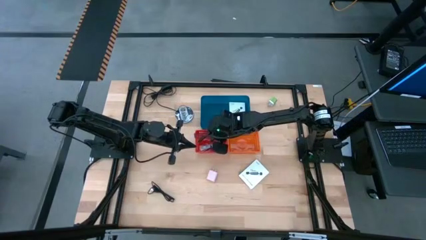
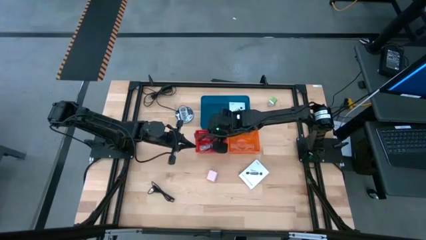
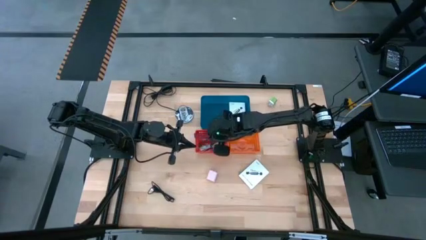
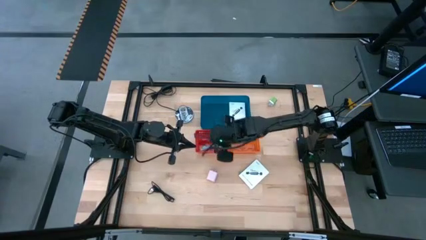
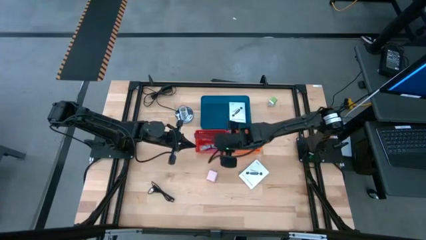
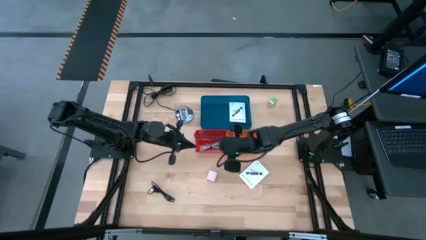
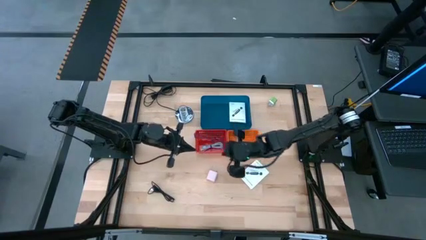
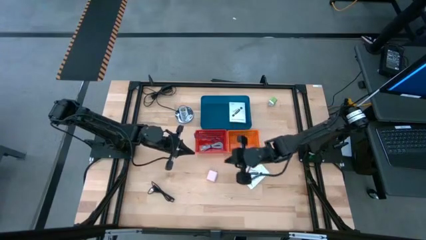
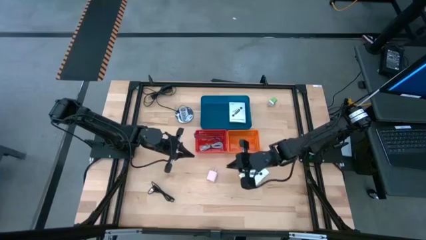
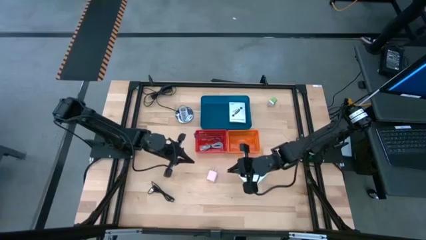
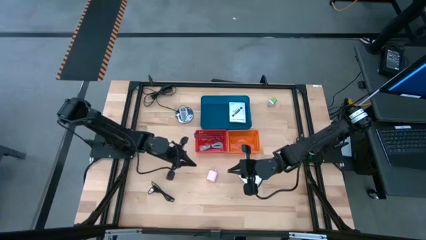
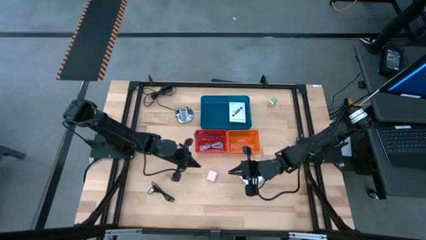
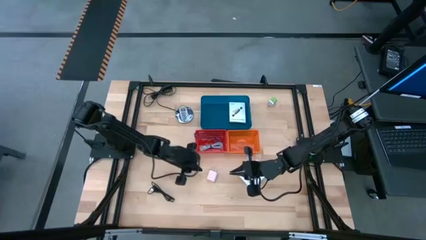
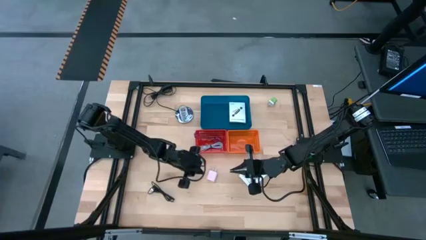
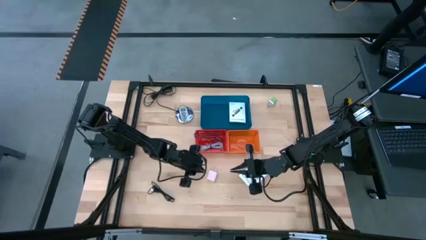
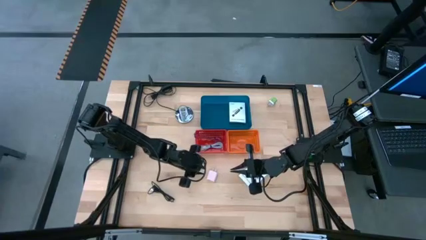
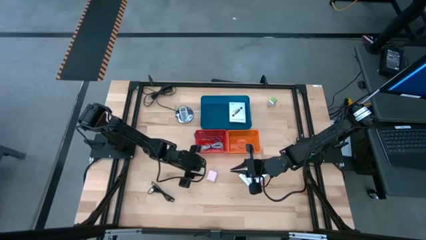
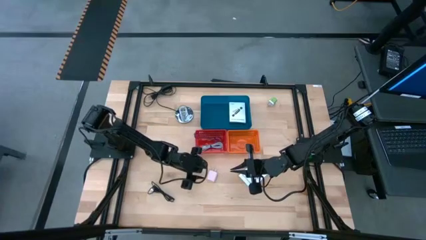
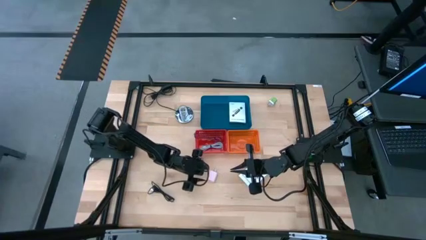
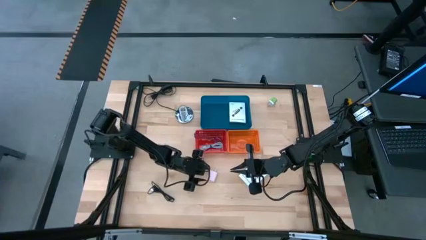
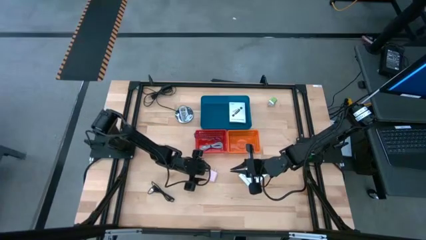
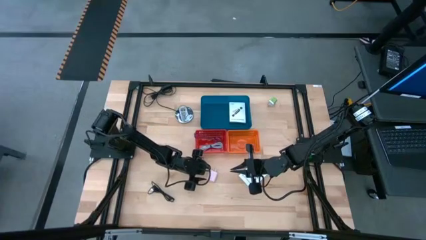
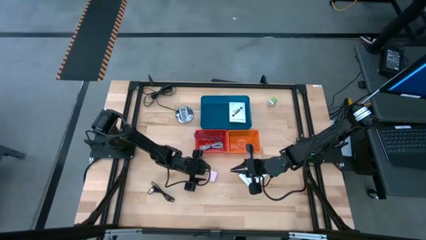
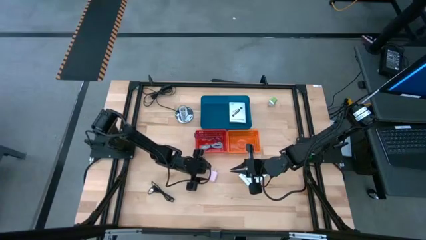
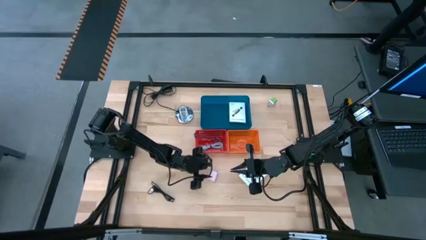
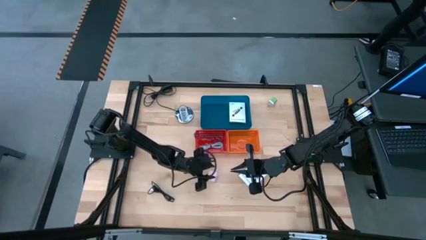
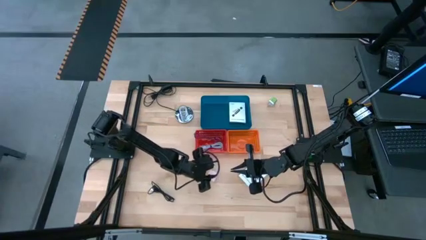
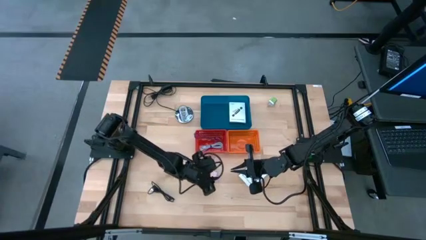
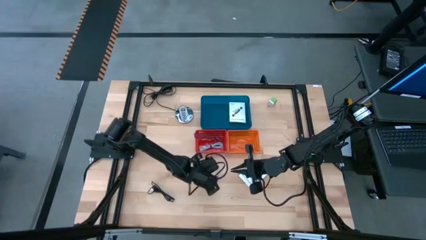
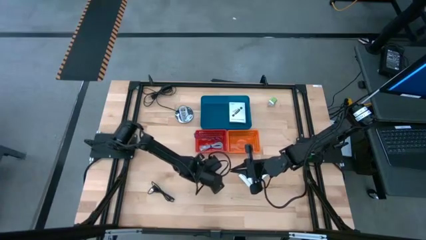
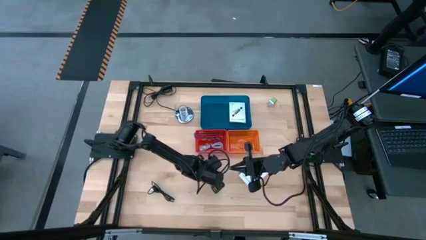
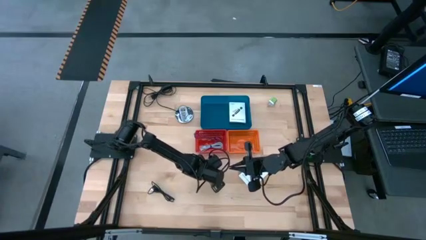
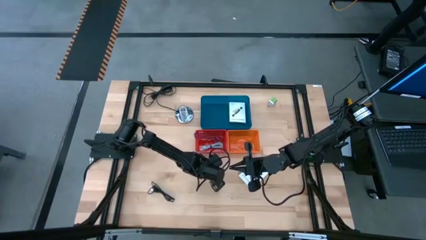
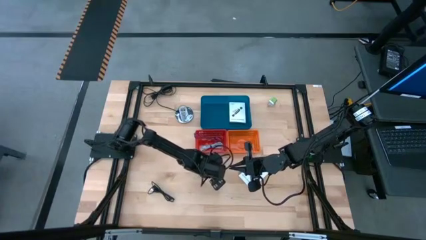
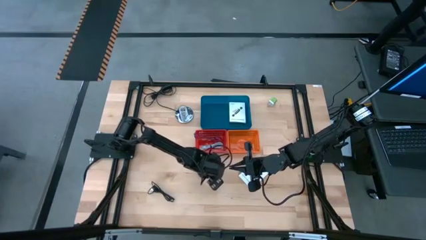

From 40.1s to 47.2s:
Task: Pick and place items into bin
Put the white charger adapter into the orange bin

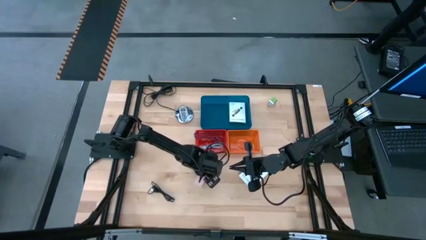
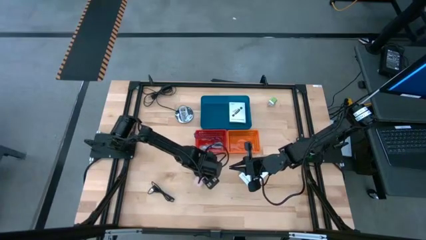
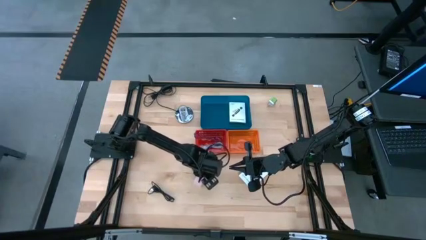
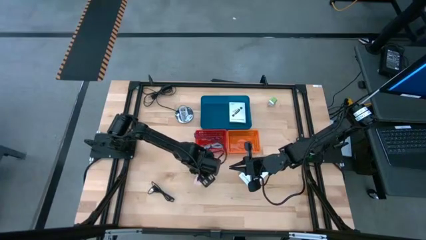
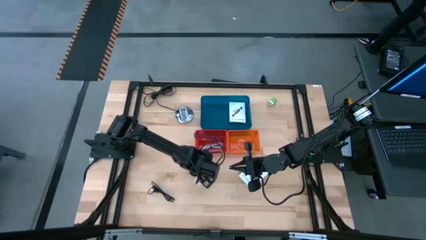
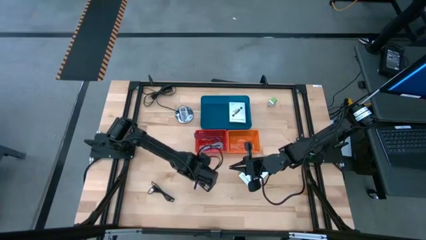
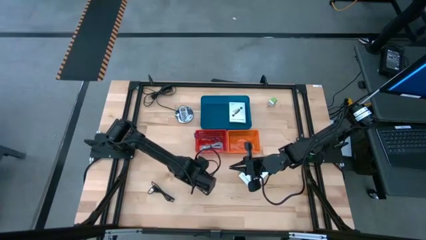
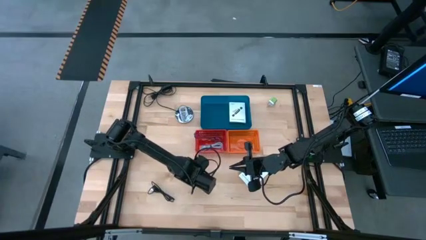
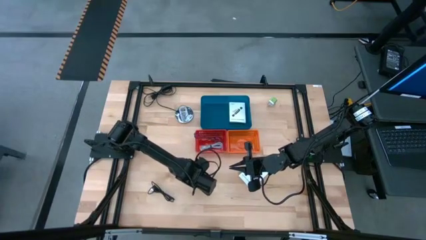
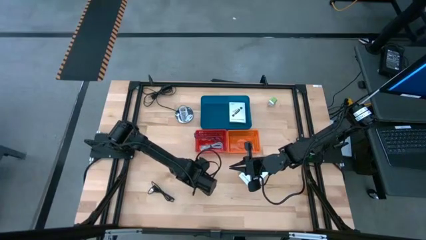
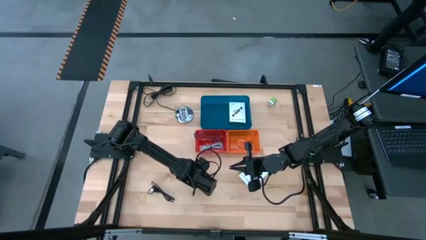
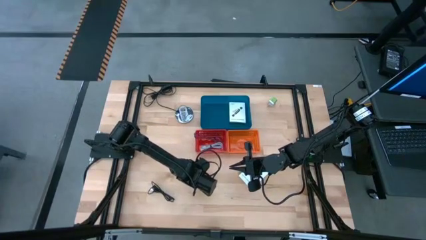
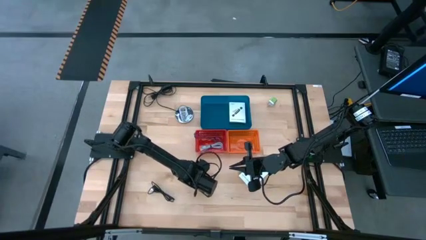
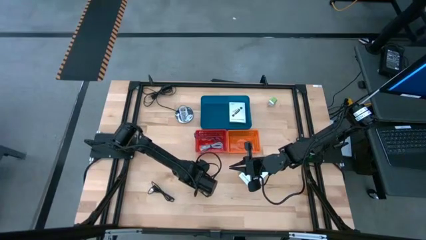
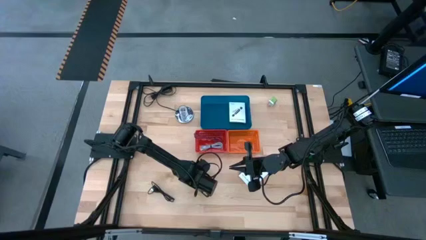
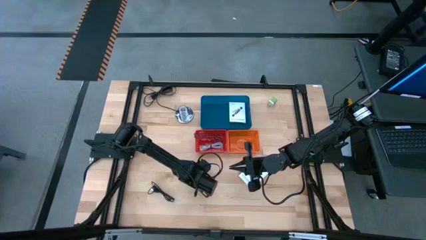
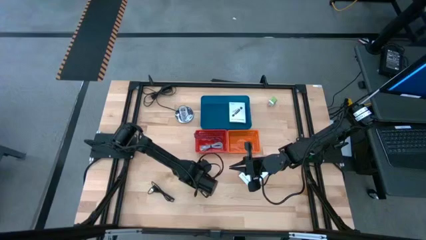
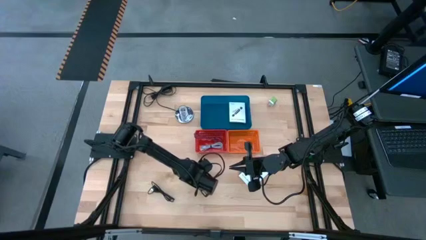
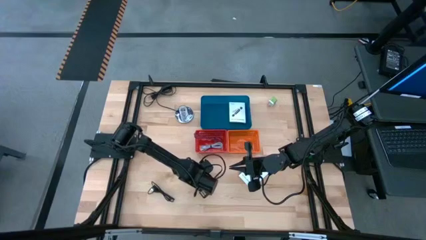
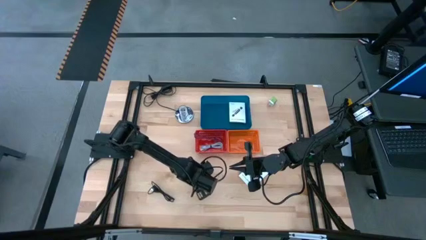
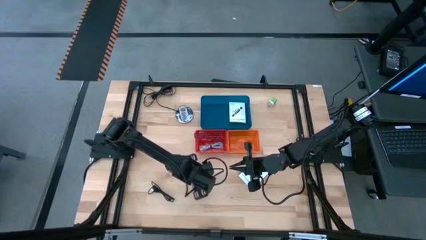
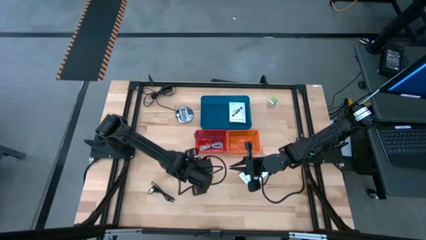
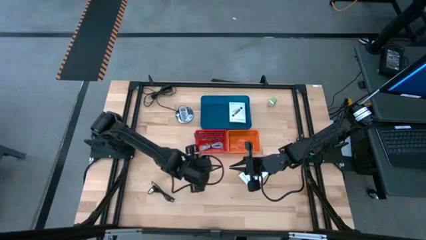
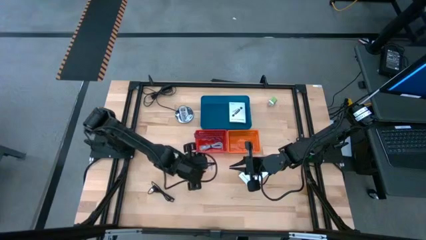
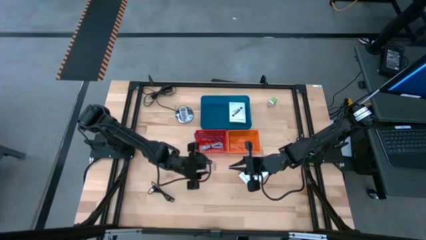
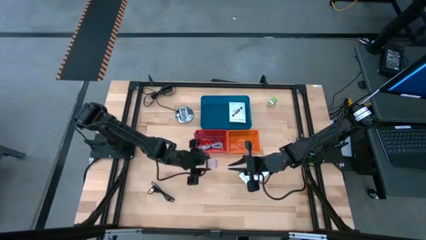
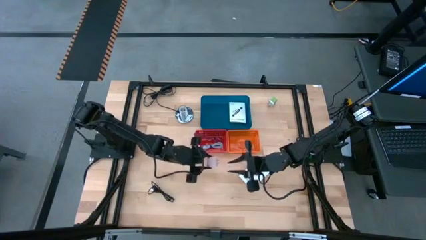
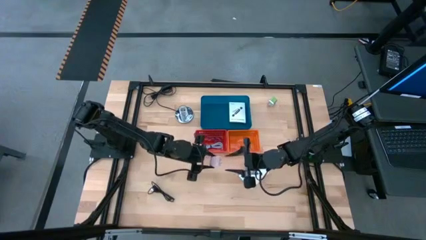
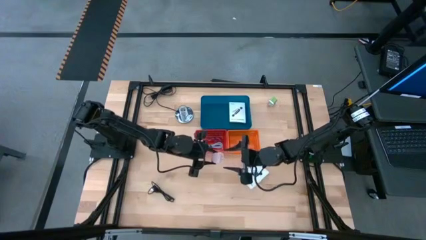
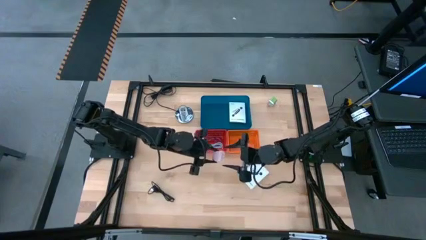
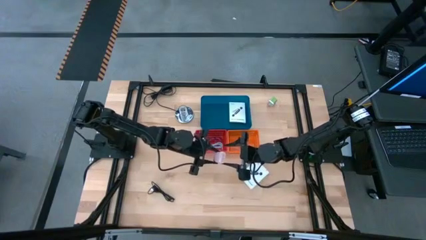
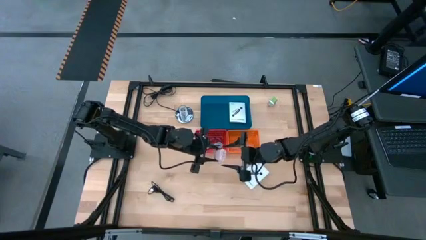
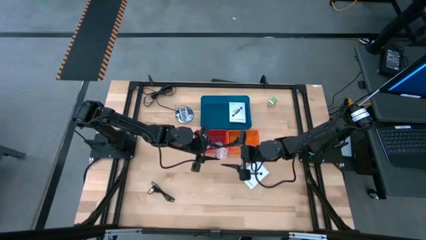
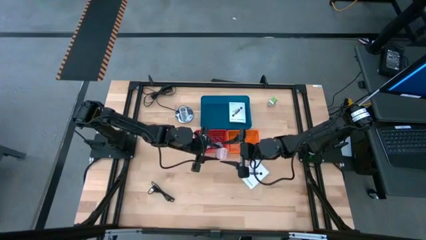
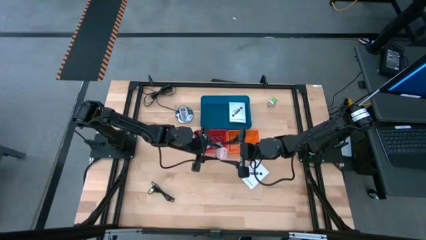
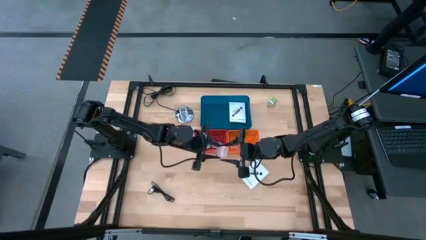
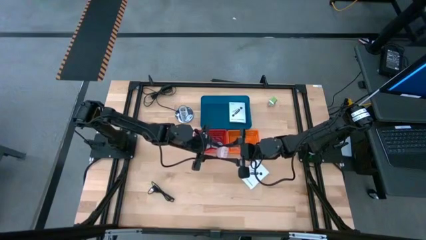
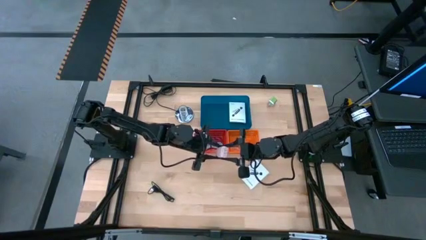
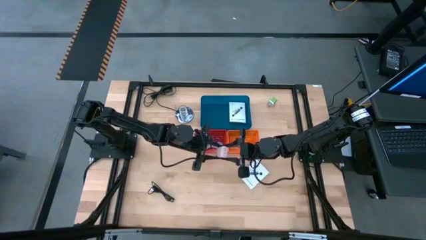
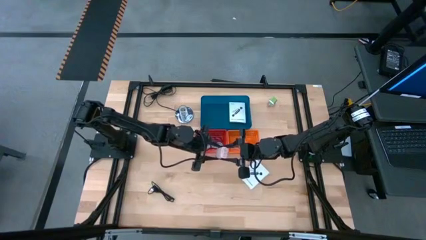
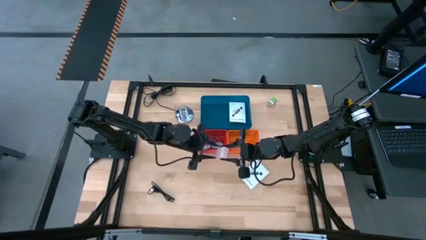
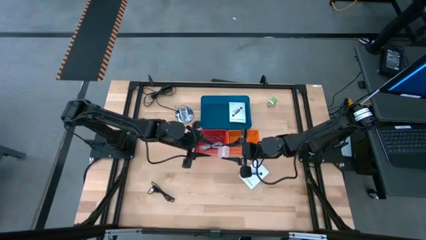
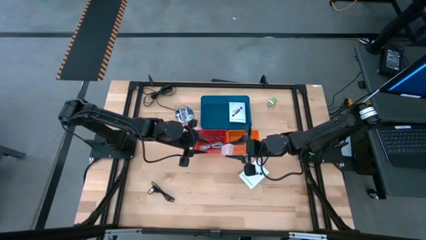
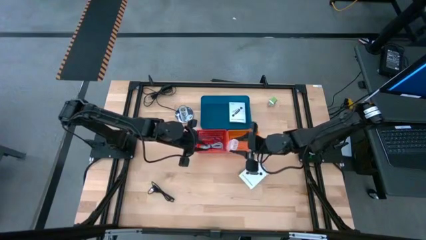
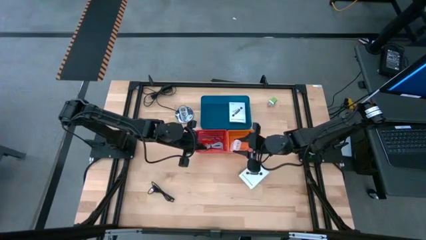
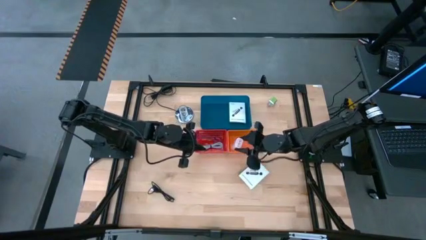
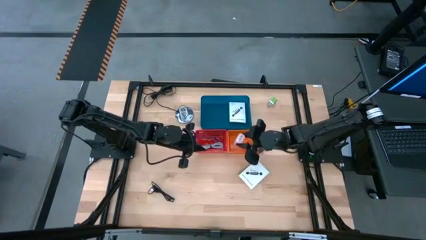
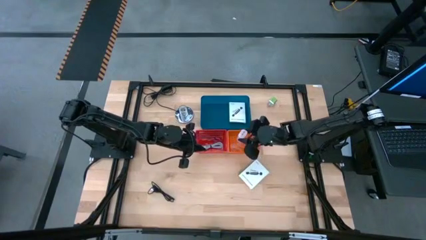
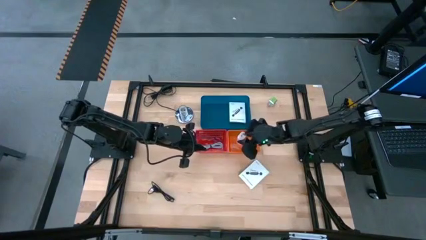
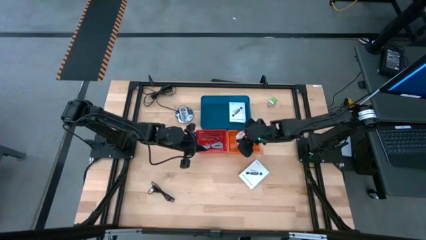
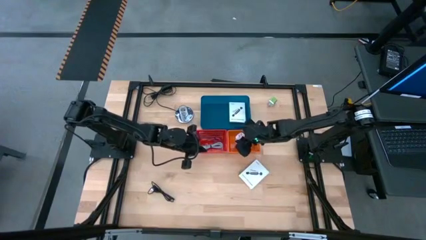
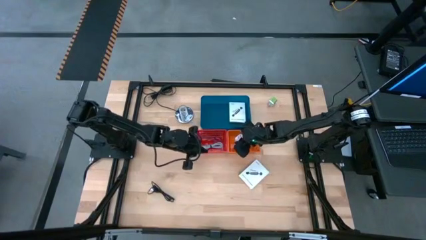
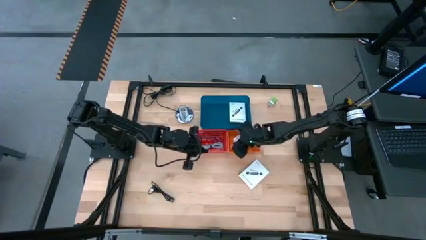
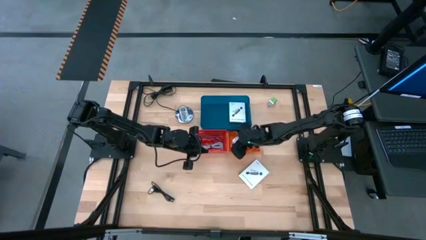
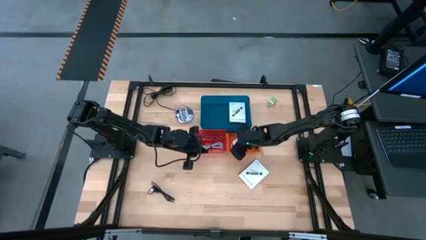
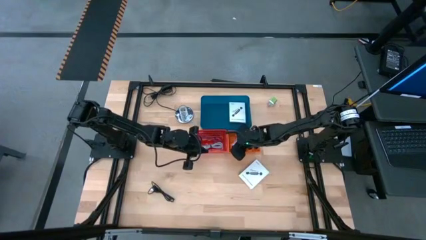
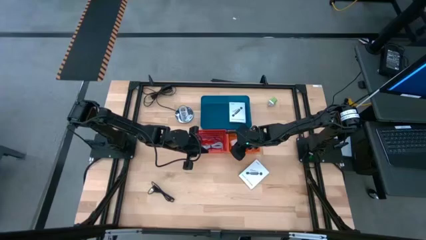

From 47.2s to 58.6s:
Put the white charger adapter into the orange bin
